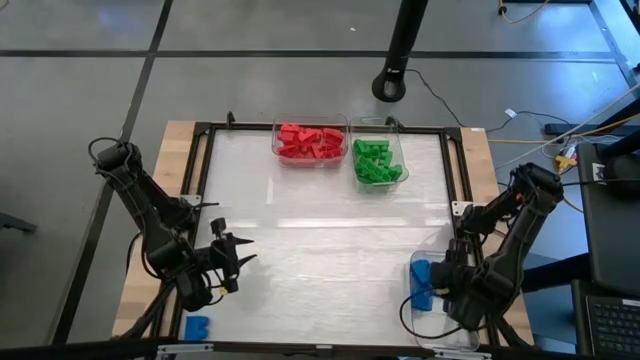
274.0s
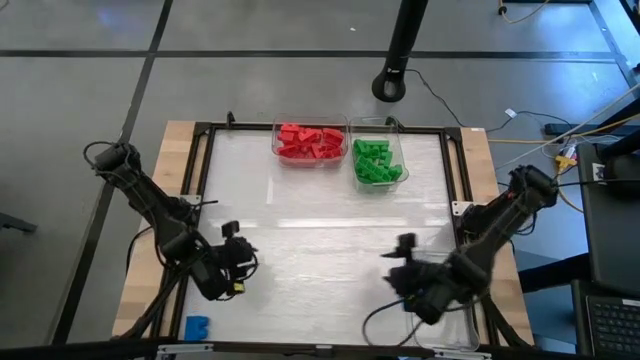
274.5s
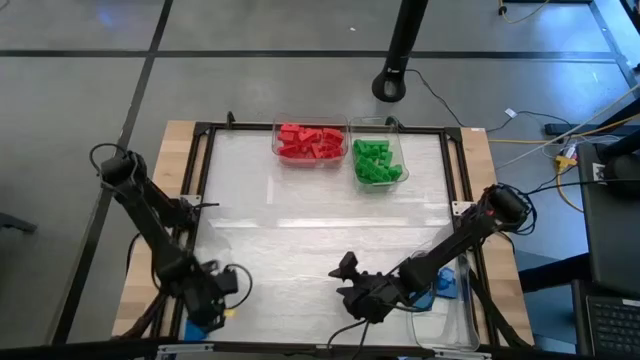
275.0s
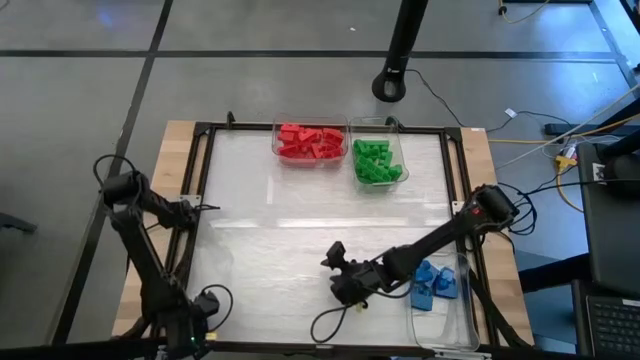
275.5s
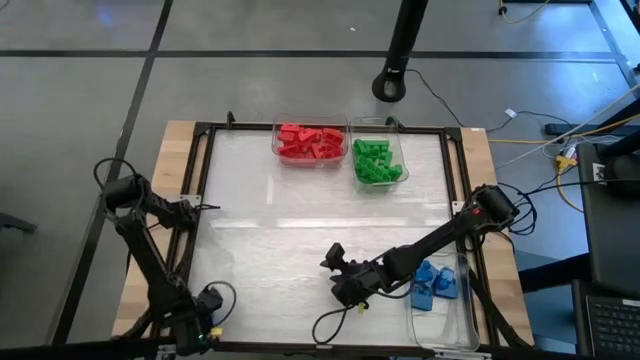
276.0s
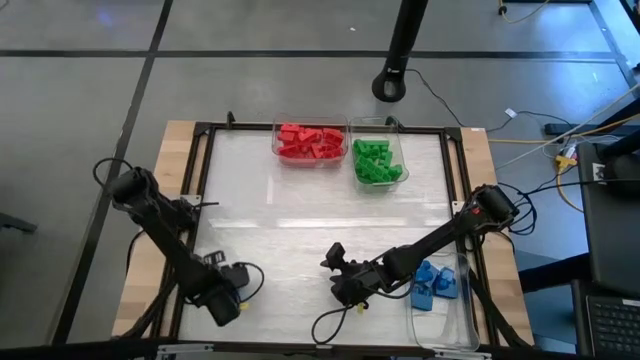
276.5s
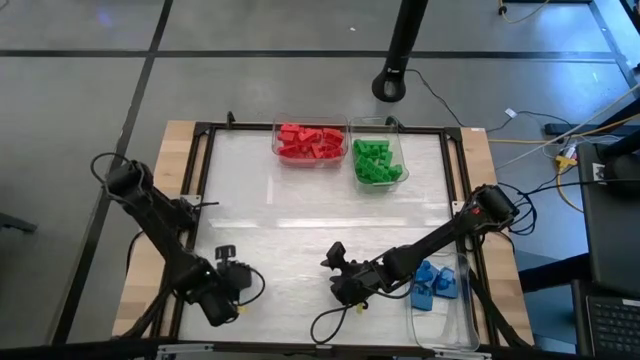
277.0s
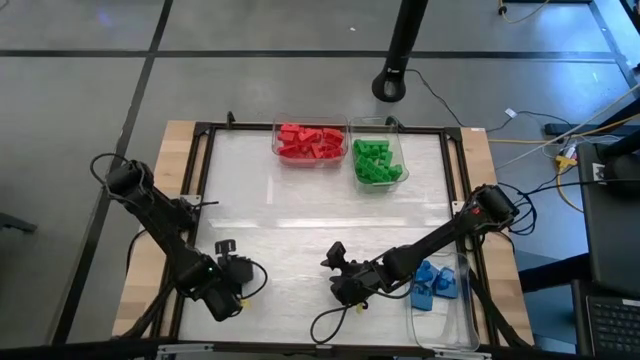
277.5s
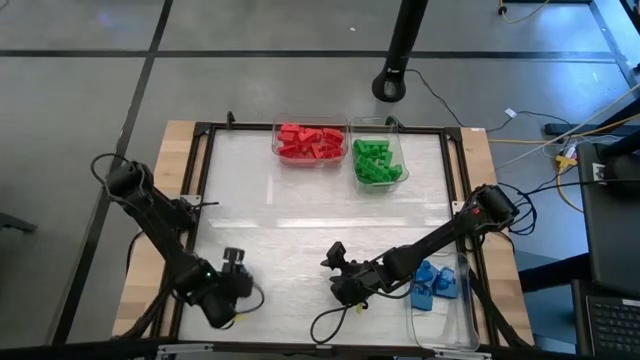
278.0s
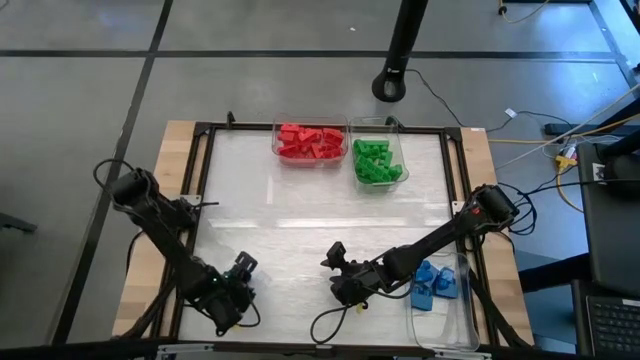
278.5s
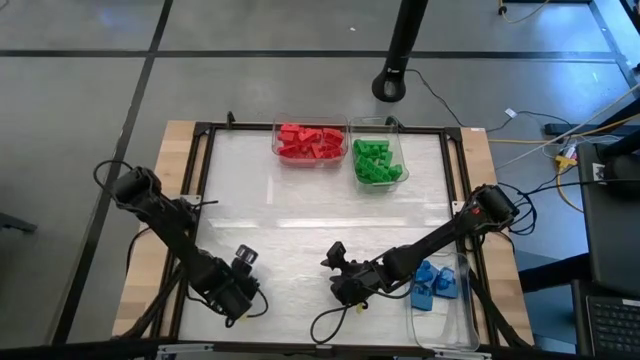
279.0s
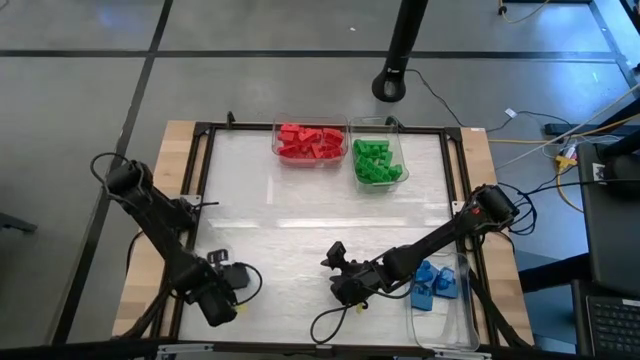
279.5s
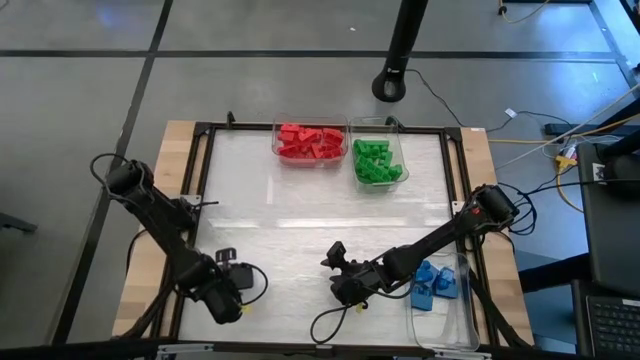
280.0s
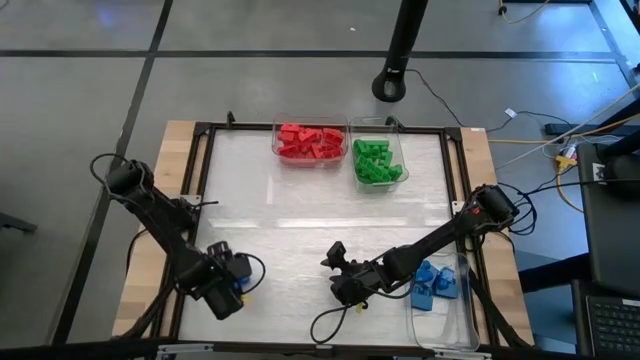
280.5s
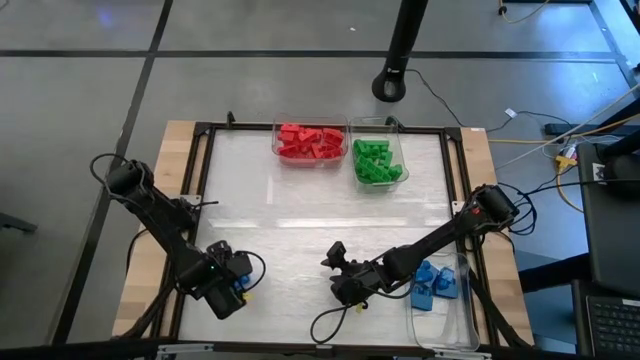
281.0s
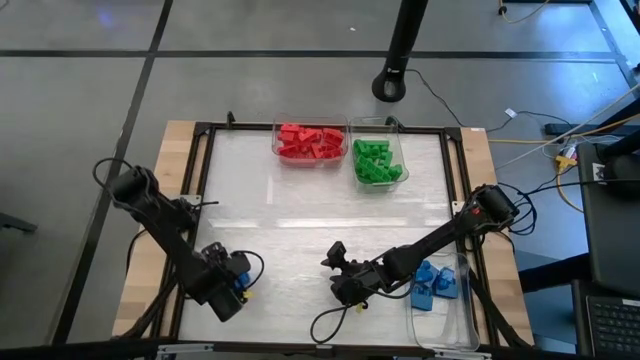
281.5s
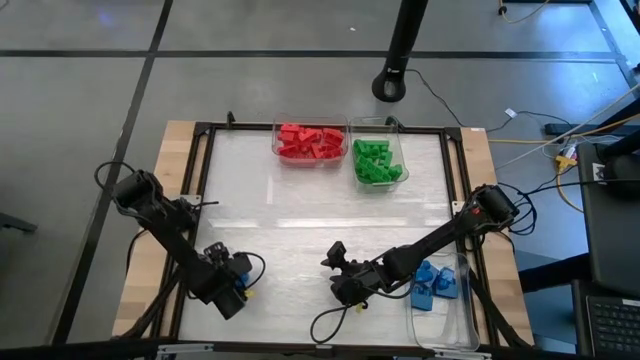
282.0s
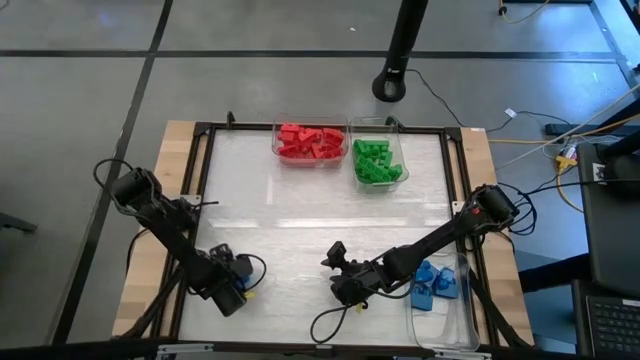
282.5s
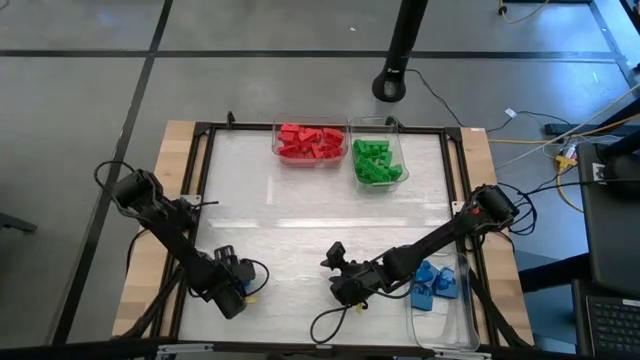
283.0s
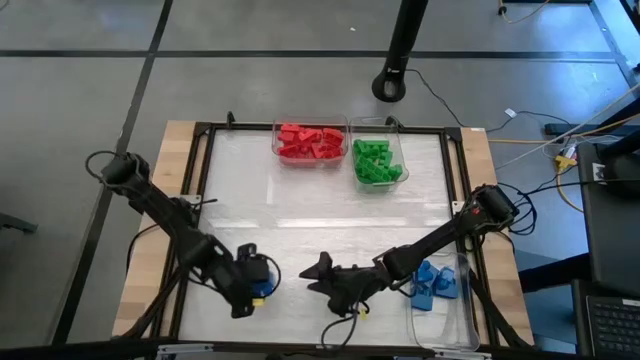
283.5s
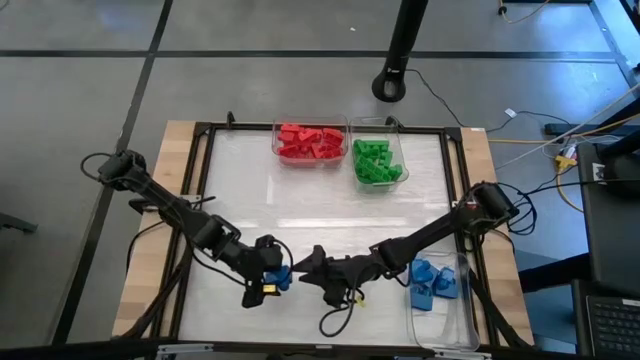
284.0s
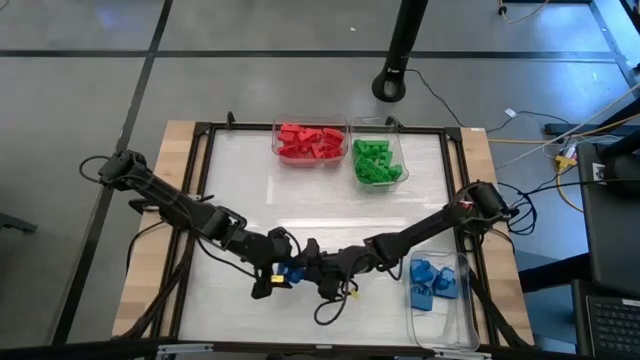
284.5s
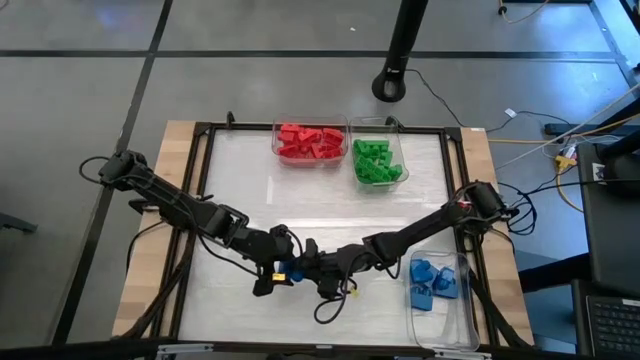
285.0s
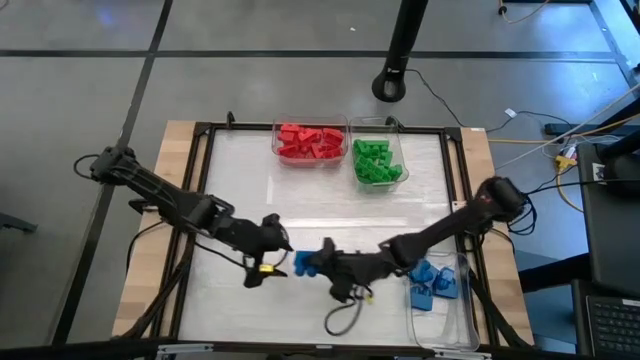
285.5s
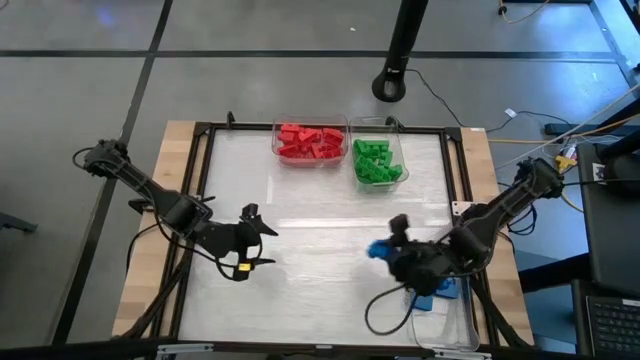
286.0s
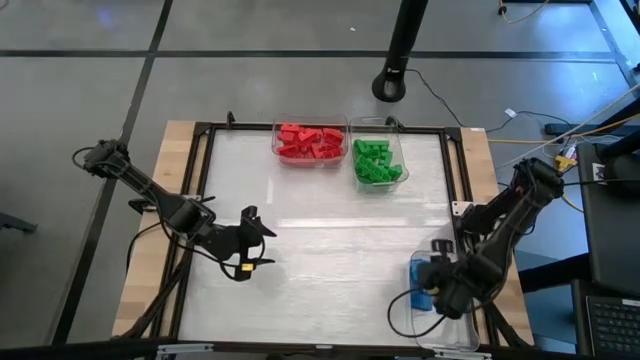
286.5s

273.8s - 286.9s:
Task: Sort blocks
Put the blue game piece into the bottom transparent bin

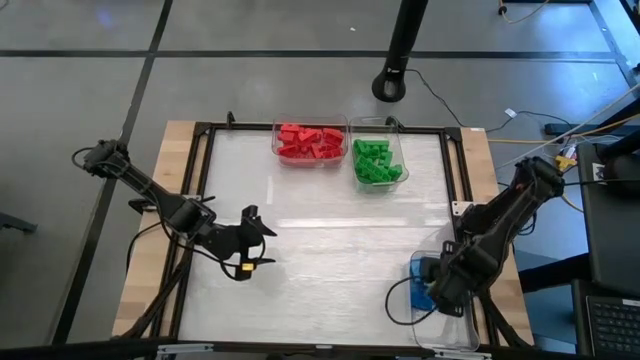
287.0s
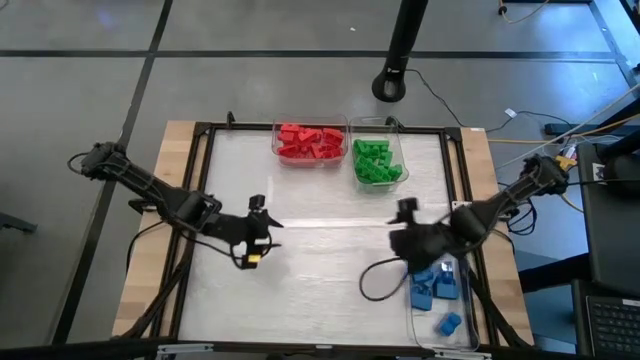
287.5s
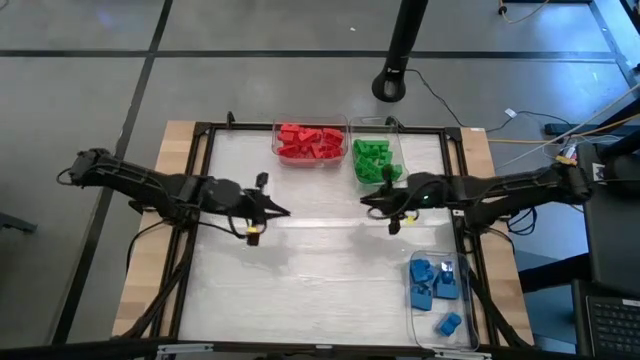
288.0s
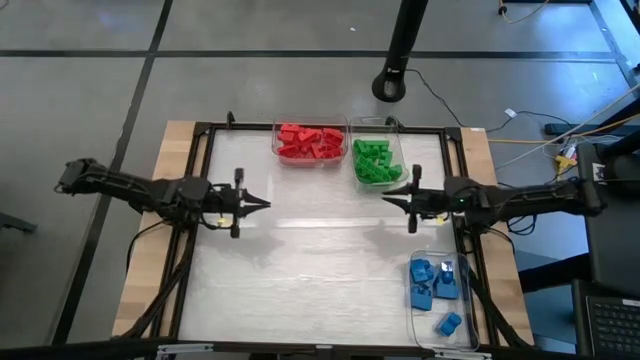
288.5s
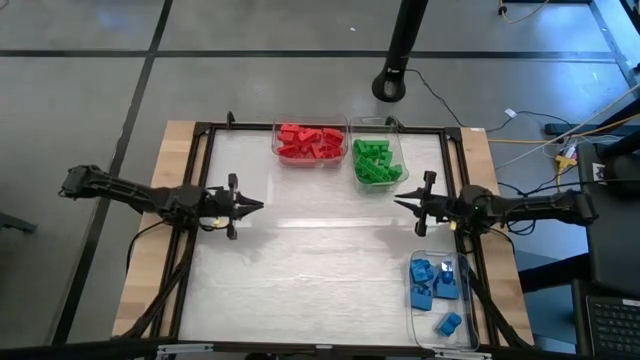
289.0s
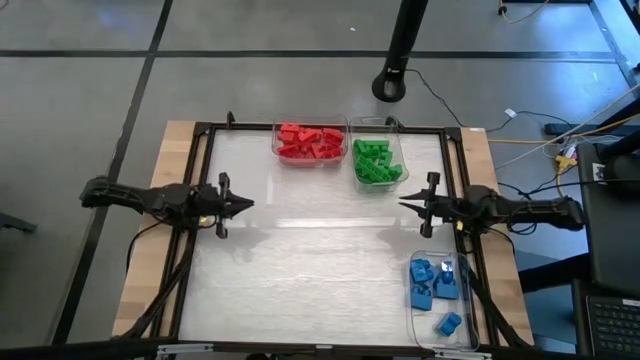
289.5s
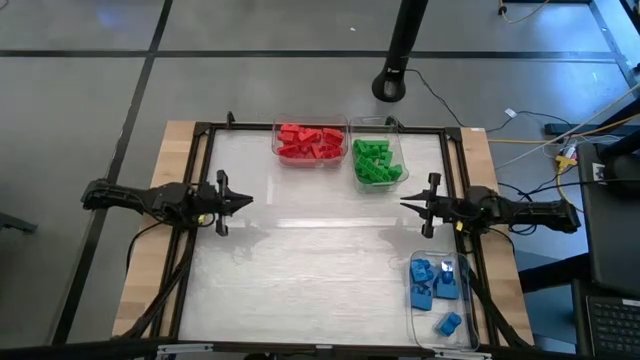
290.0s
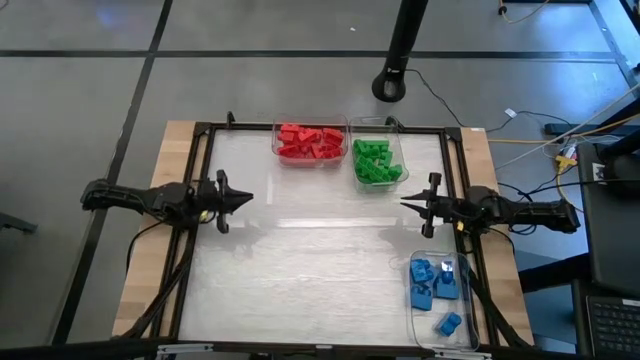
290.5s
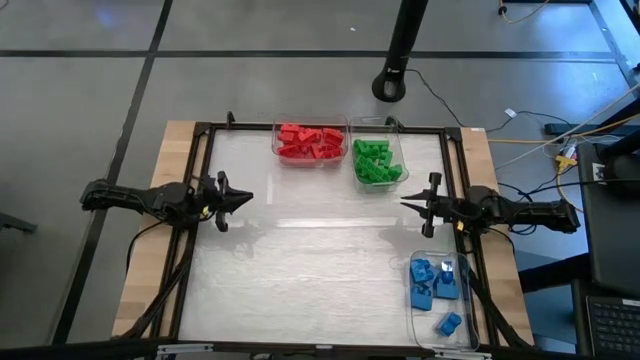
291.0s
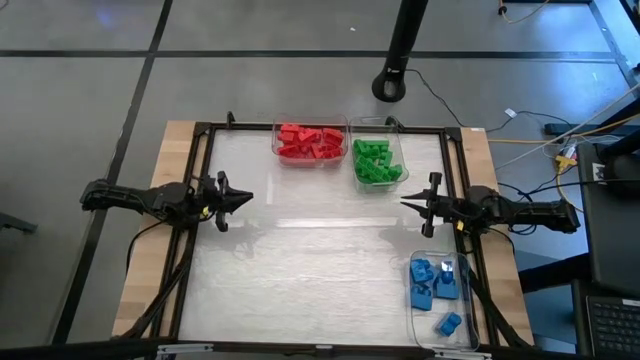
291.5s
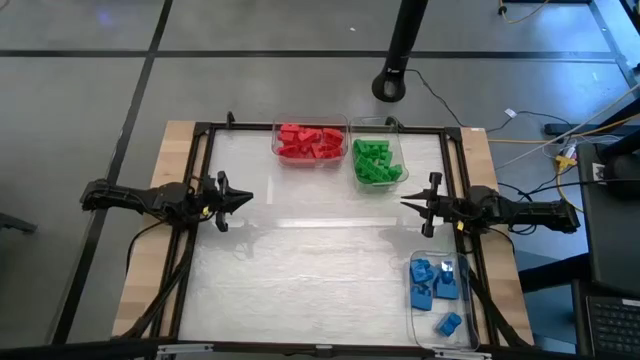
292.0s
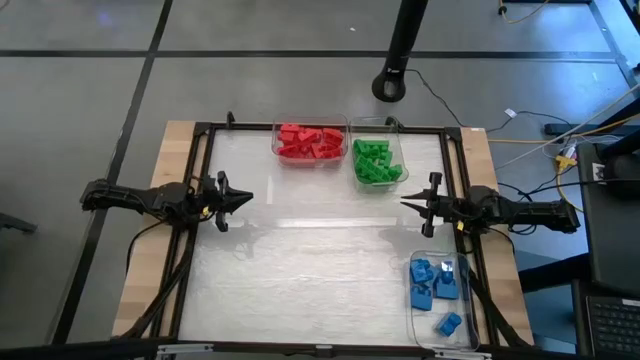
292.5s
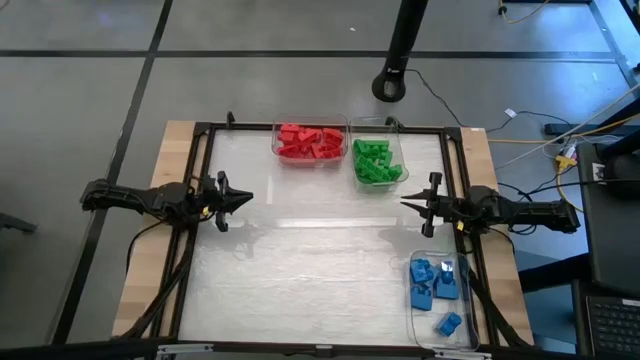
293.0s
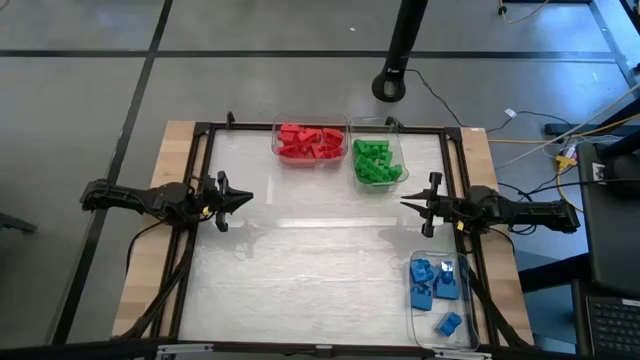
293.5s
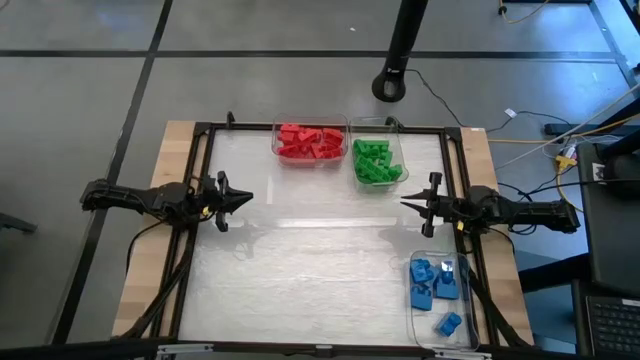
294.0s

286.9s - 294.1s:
Return to Home Position
